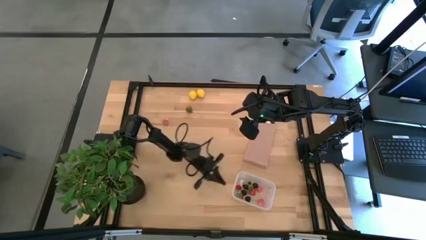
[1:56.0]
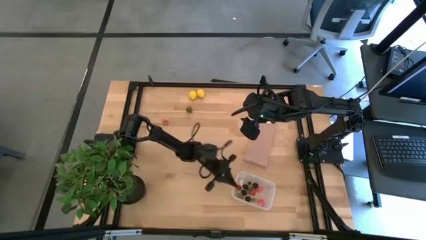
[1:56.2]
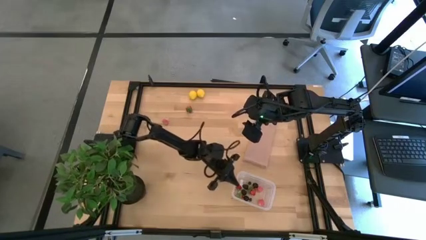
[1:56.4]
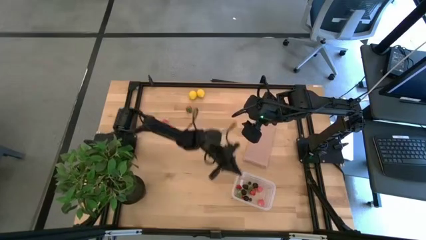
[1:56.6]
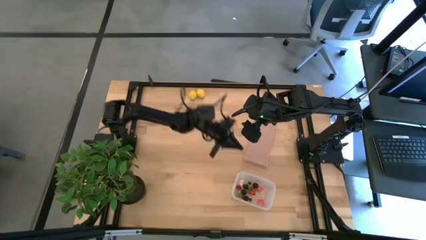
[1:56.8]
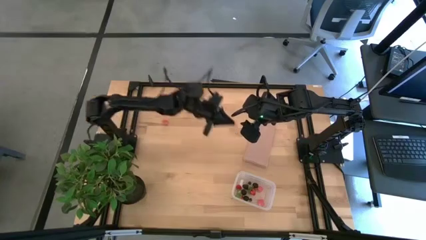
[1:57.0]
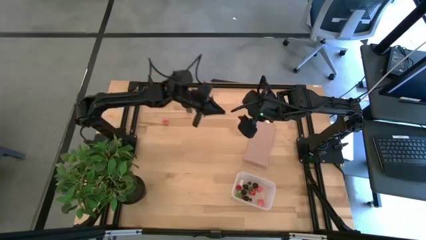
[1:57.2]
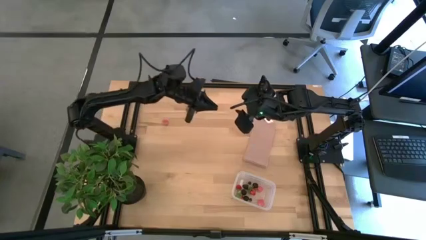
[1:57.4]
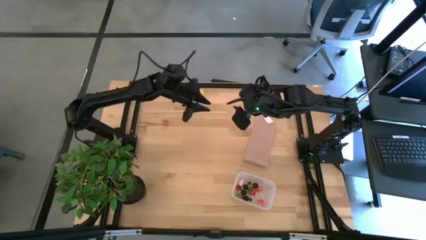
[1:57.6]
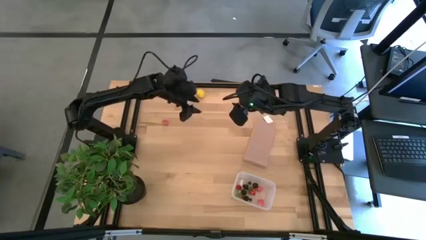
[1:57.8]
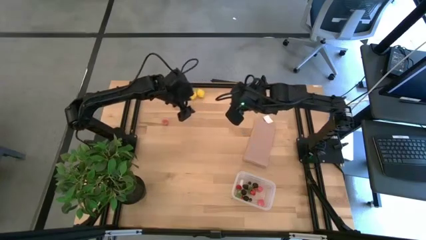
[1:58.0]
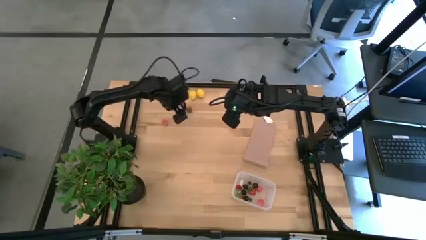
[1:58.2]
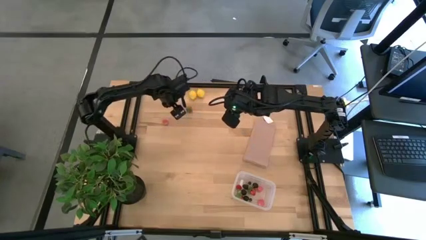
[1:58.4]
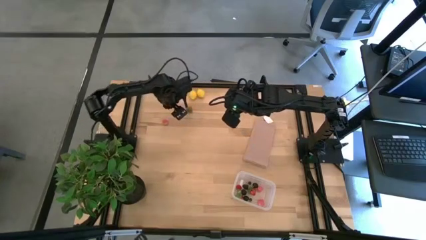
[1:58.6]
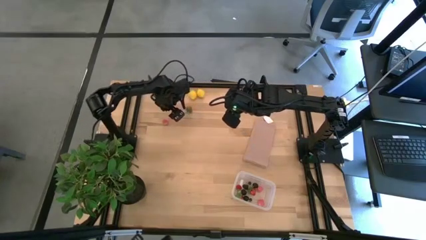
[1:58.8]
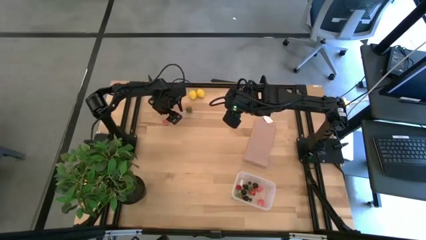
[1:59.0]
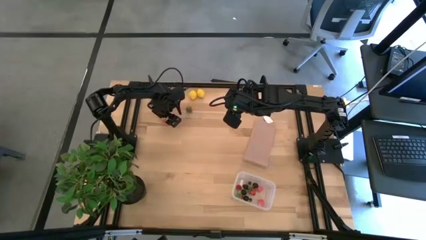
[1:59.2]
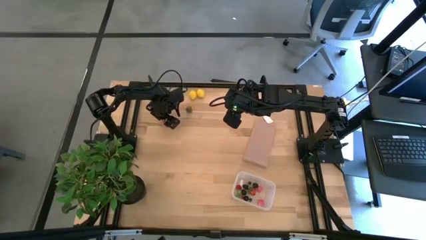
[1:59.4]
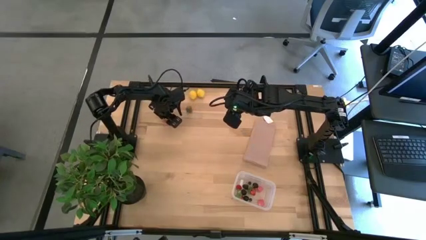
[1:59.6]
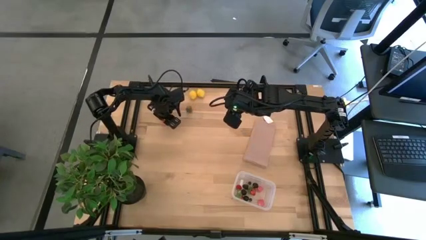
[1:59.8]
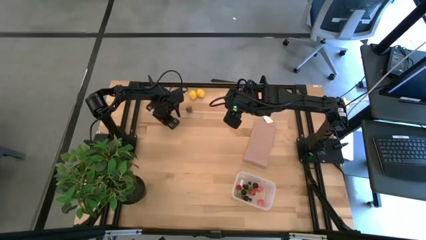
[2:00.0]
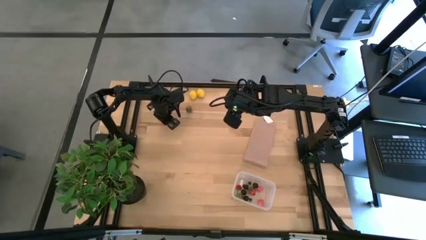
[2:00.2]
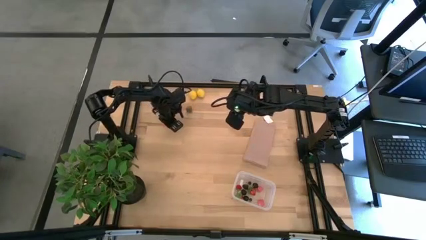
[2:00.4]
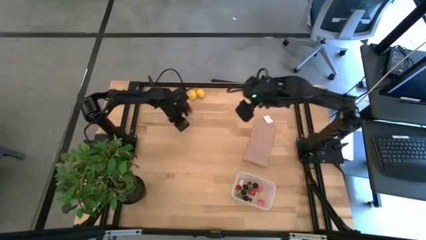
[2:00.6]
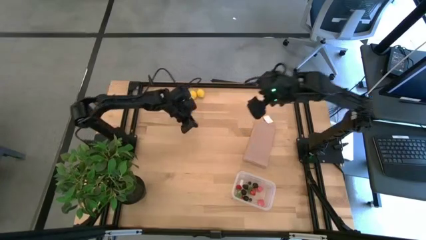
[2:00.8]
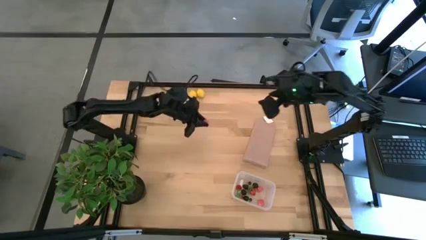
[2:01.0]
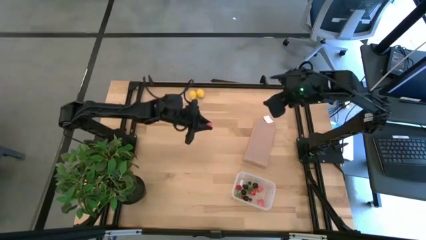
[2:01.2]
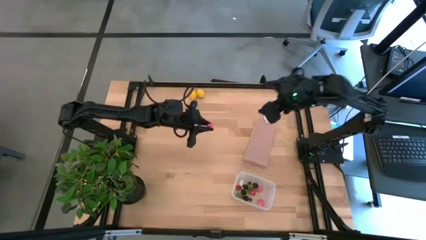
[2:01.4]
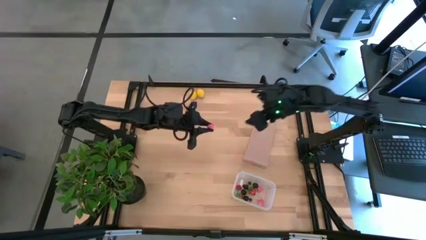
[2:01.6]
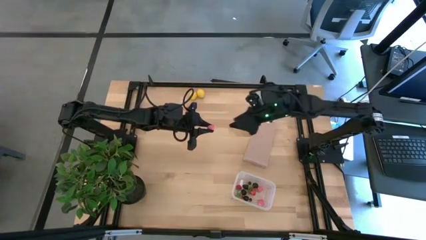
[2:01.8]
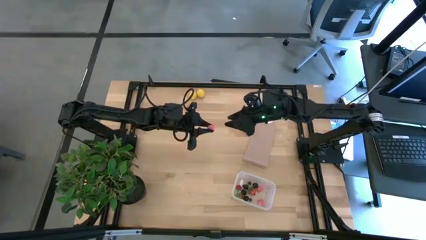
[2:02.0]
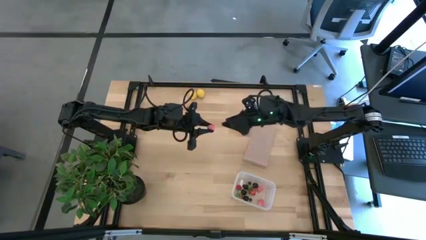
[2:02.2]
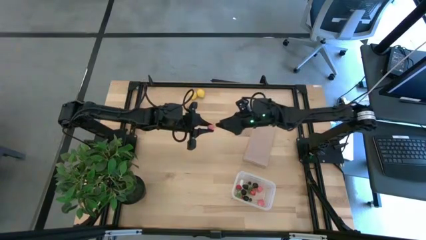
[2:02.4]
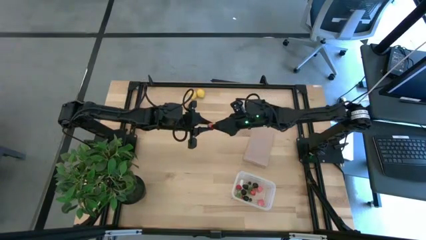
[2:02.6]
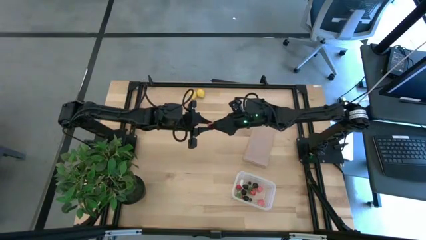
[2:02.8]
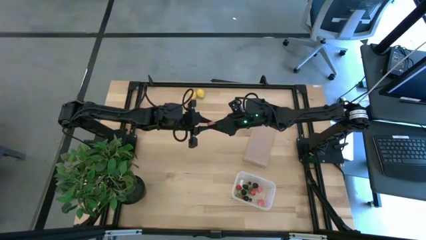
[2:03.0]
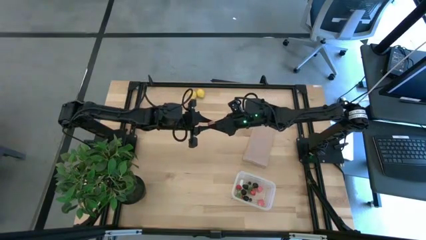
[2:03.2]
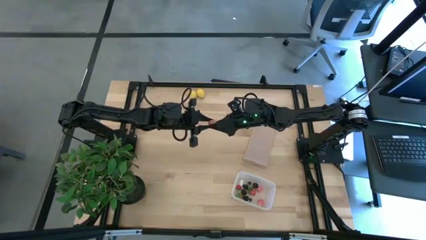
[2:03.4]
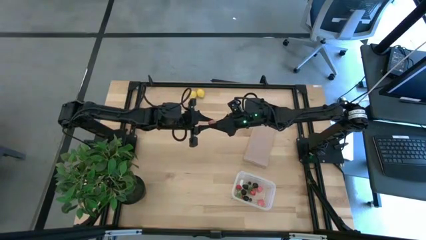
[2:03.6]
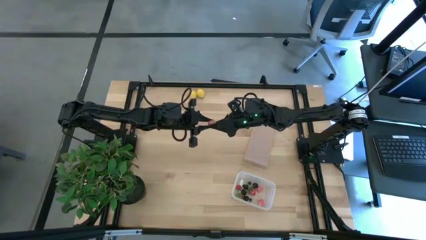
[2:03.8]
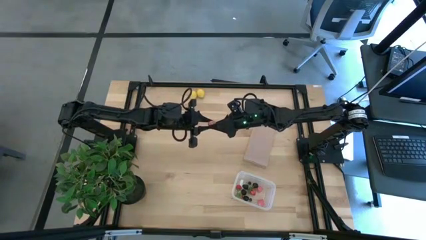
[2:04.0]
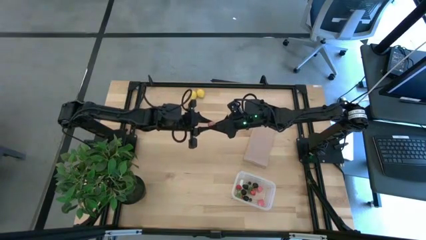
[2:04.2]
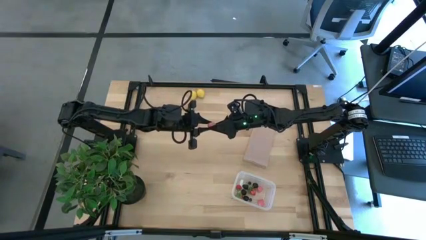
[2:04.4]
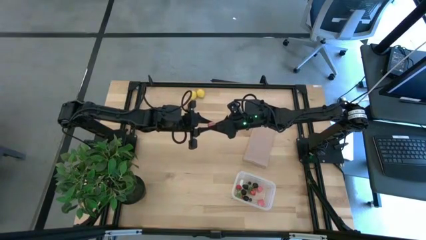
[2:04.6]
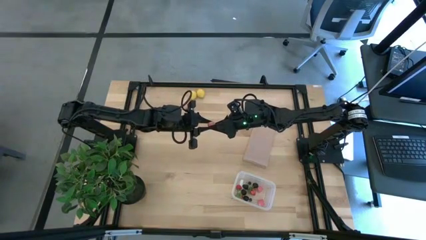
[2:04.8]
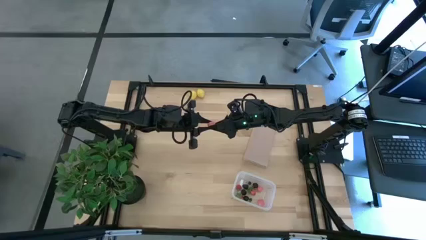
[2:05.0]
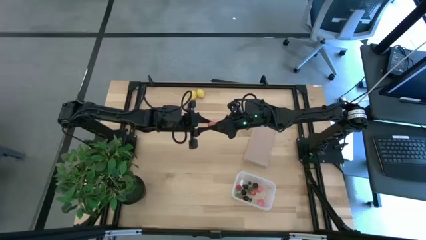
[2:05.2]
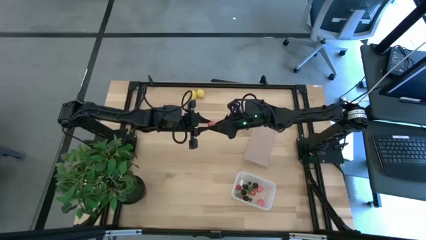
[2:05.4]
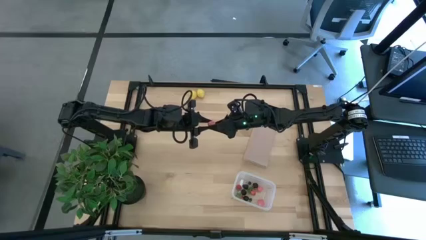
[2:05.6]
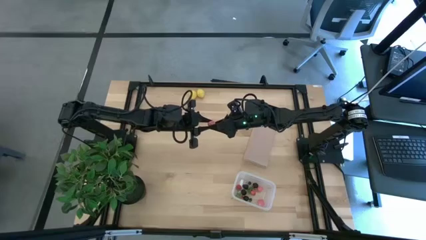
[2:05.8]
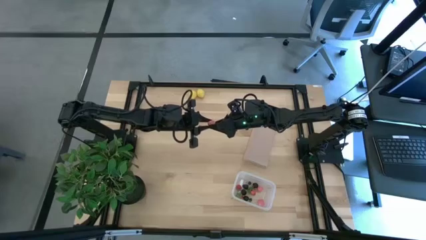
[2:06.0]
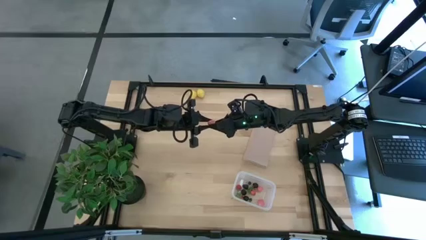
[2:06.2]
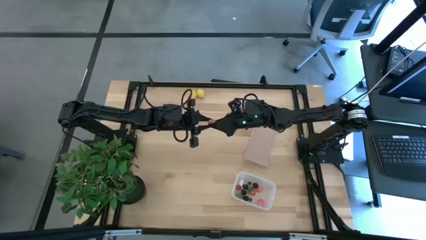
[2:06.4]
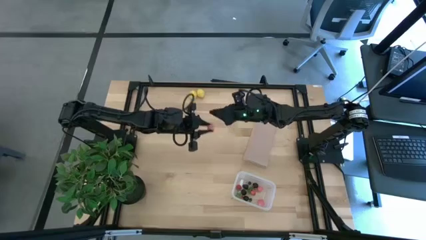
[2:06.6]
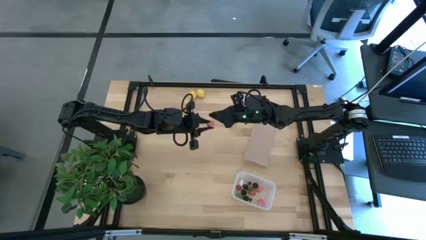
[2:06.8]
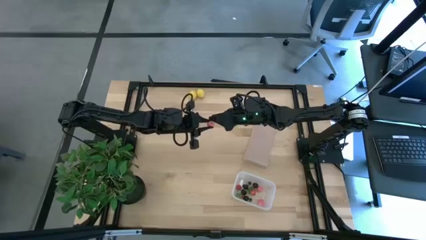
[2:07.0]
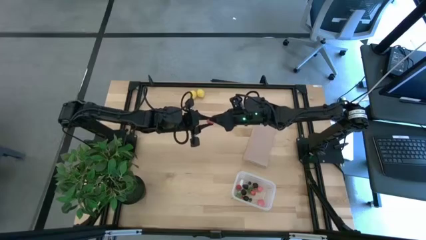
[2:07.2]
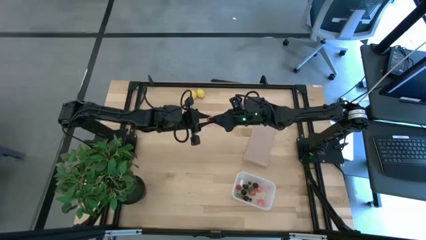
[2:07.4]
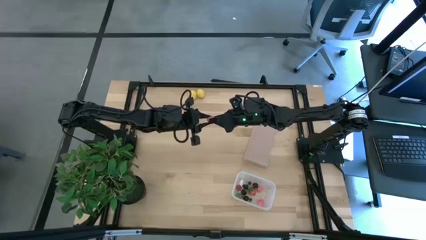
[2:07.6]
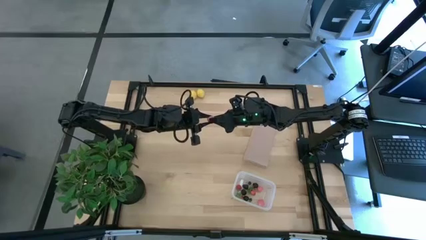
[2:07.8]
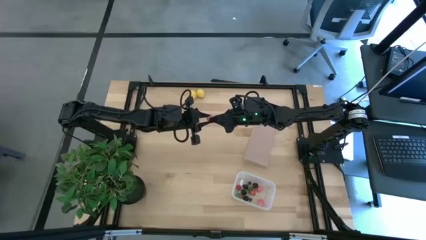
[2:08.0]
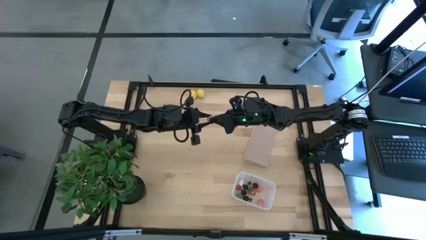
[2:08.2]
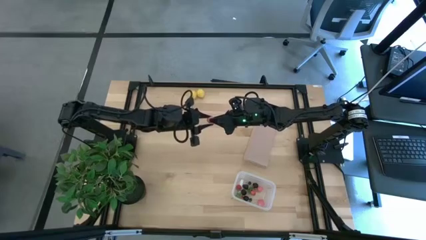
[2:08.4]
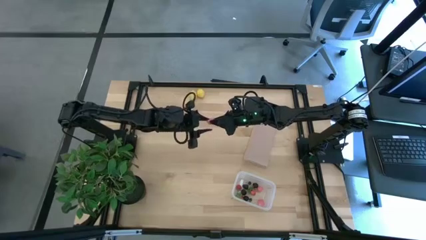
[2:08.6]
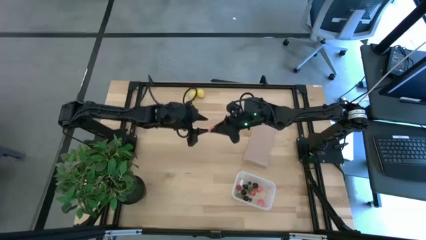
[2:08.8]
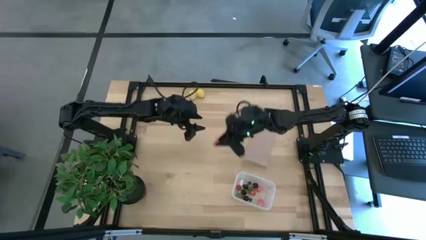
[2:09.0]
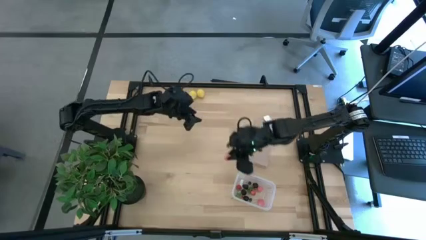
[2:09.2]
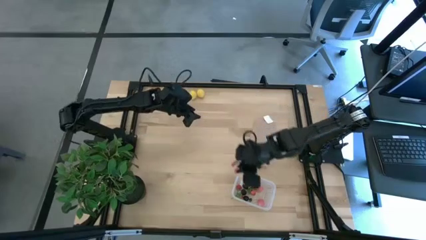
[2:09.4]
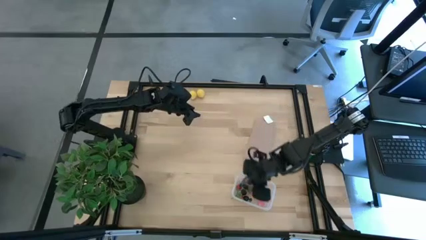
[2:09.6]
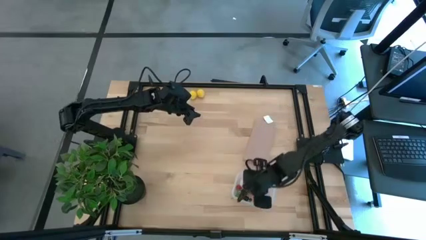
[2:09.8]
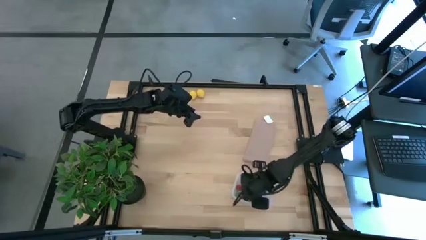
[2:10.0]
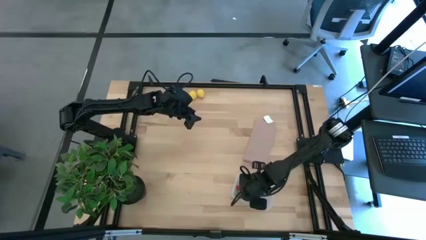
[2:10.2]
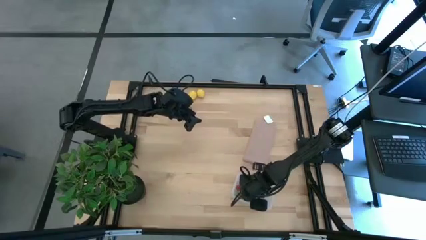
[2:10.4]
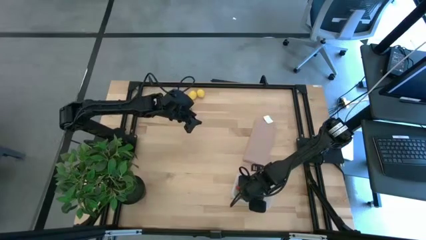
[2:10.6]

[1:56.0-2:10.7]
Task: Pick and placing Produce into tupperware
Put the peach into the transparent container

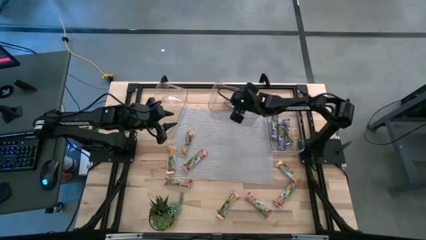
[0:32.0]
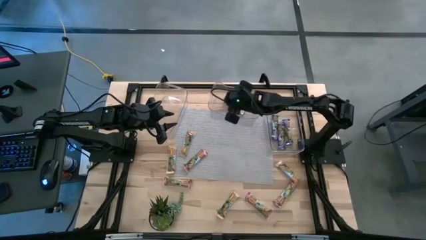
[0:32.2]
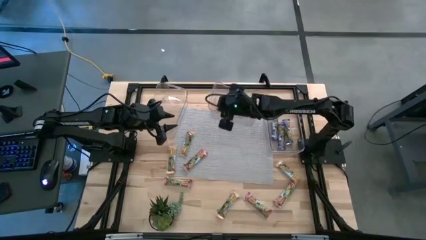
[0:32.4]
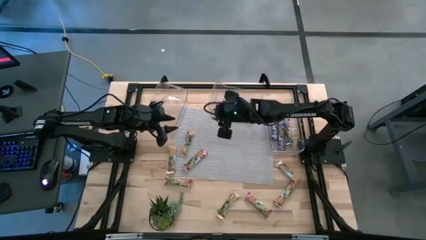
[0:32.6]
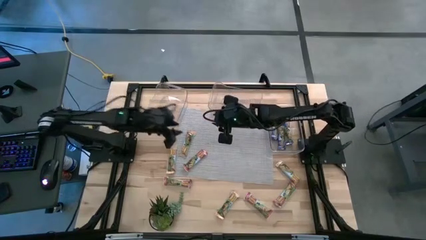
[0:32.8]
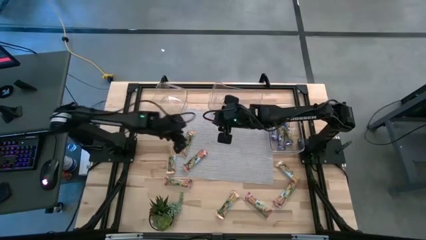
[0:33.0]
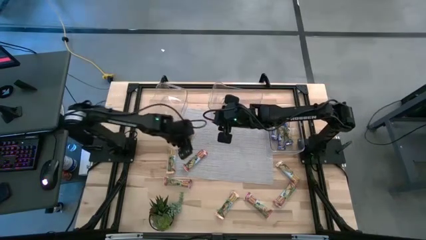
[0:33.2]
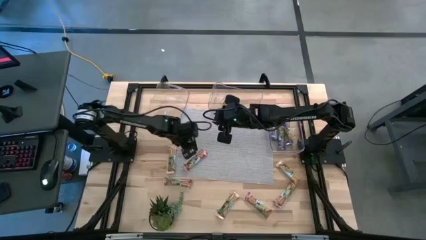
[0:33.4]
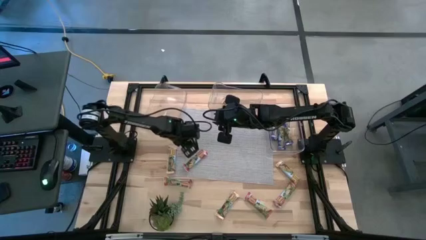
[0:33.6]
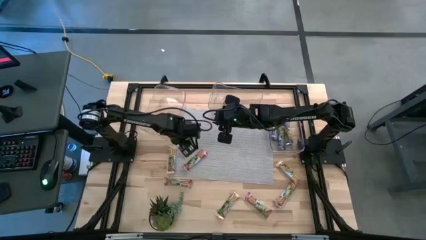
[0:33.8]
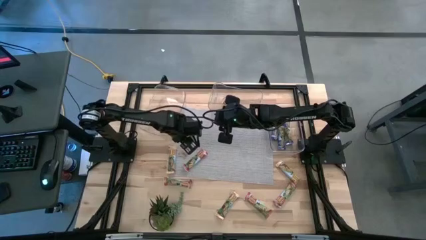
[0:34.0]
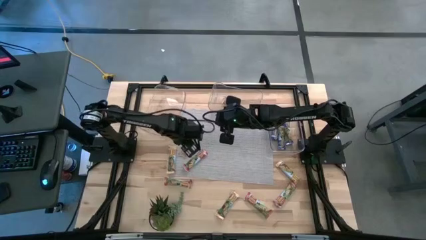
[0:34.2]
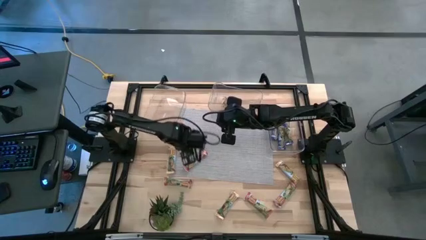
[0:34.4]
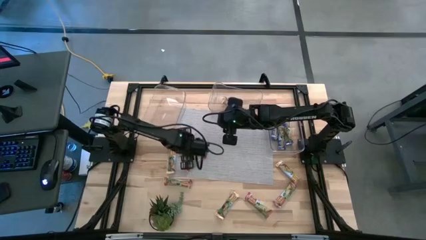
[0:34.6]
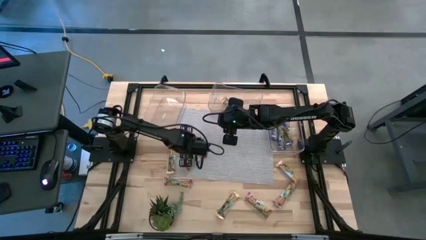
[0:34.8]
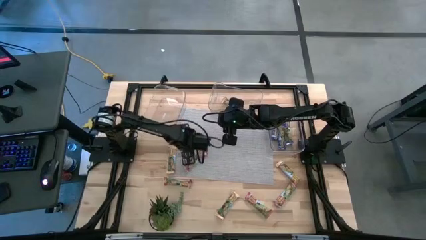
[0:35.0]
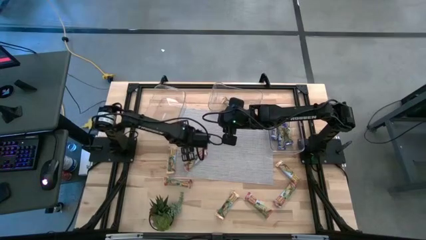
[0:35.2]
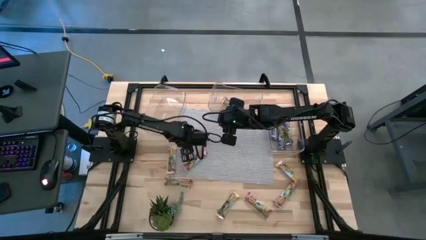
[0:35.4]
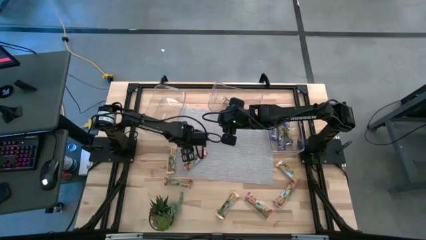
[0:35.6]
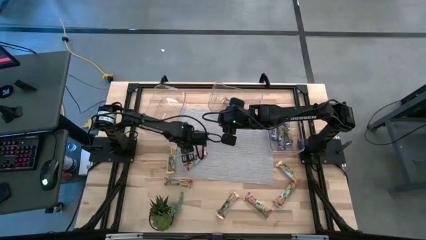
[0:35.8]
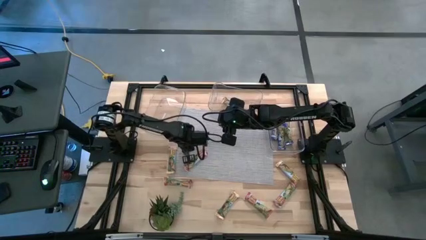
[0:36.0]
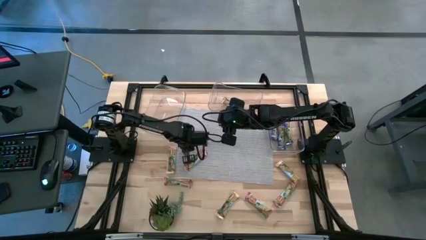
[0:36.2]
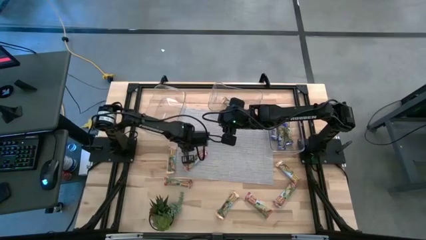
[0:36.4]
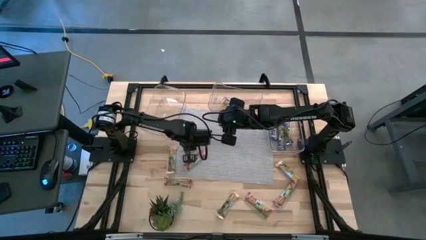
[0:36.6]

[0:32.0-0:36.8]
Task: Pick and place Granola Bars by type
Put the yellow granola bar into the middle transparent bin
